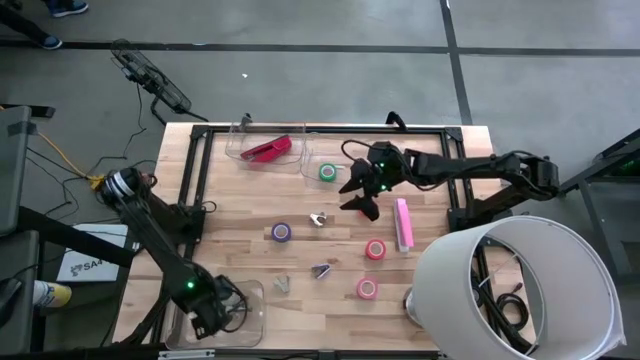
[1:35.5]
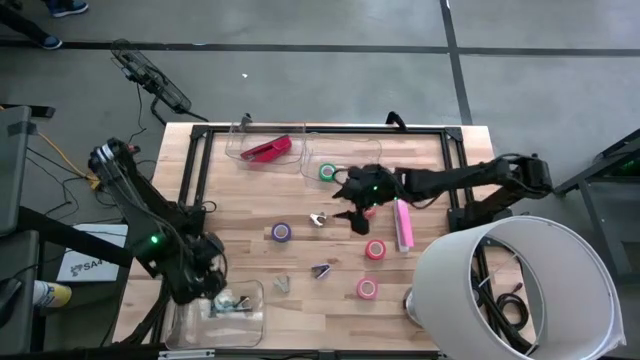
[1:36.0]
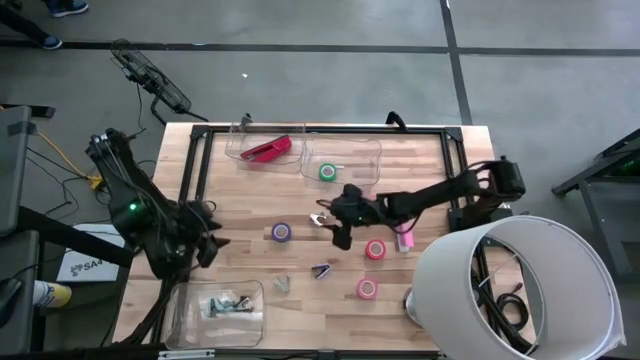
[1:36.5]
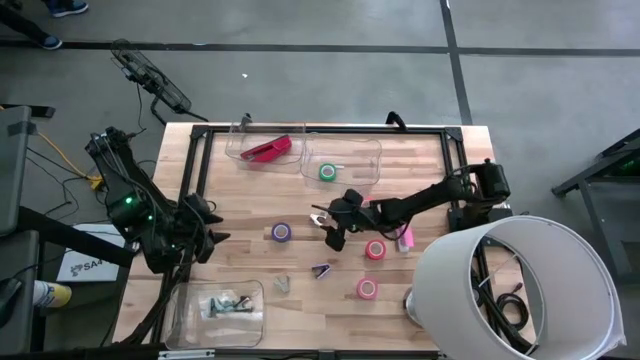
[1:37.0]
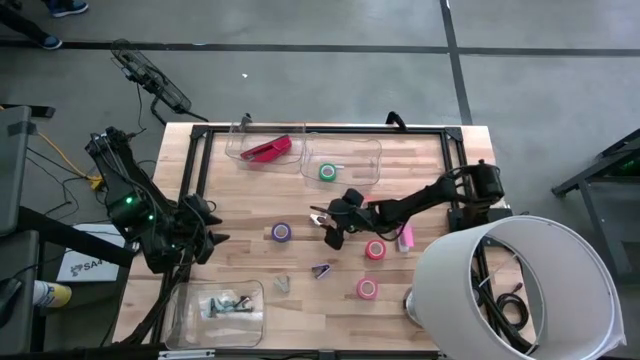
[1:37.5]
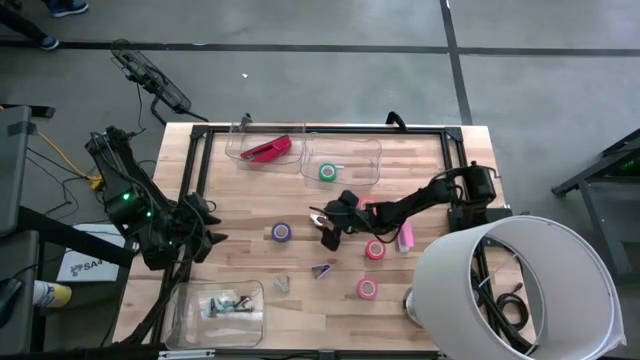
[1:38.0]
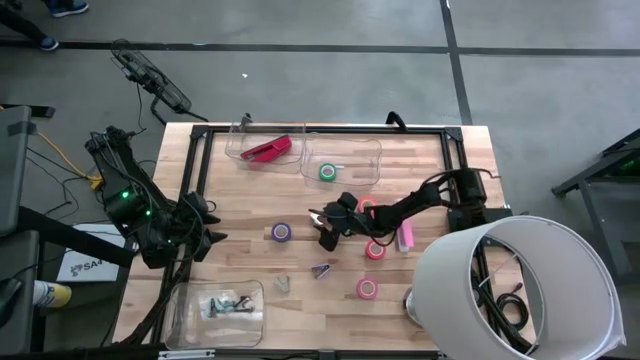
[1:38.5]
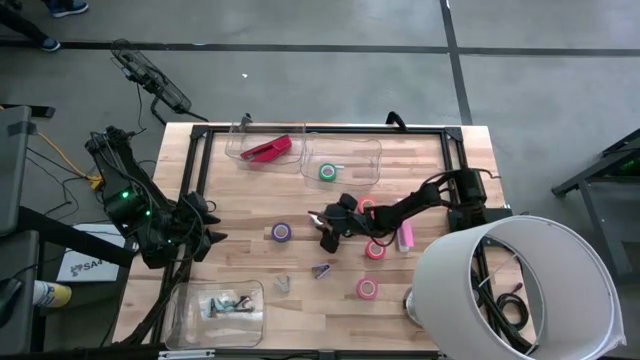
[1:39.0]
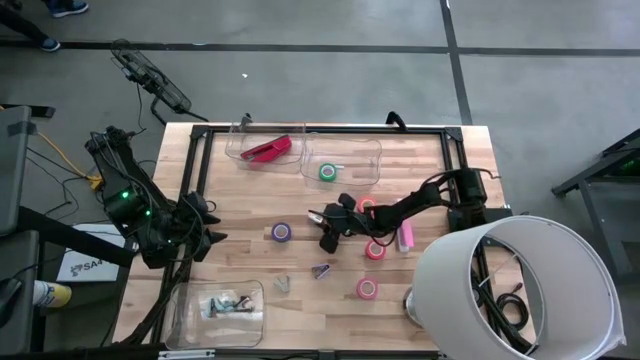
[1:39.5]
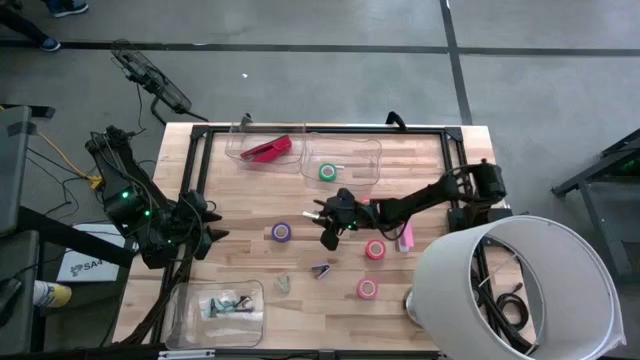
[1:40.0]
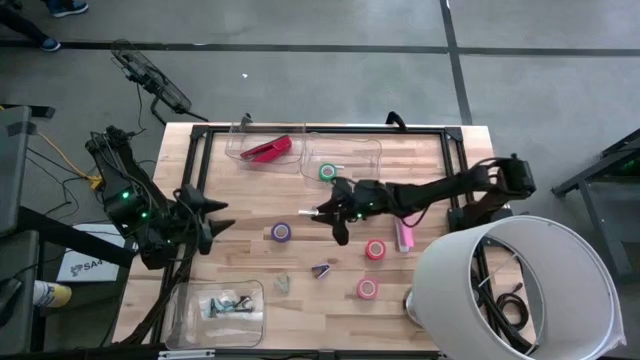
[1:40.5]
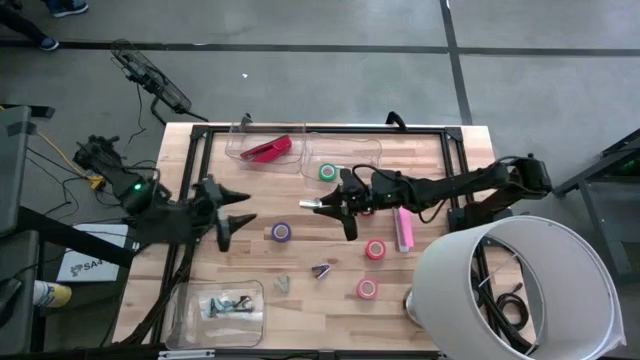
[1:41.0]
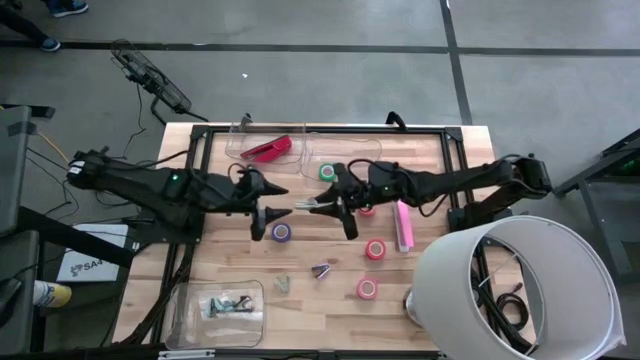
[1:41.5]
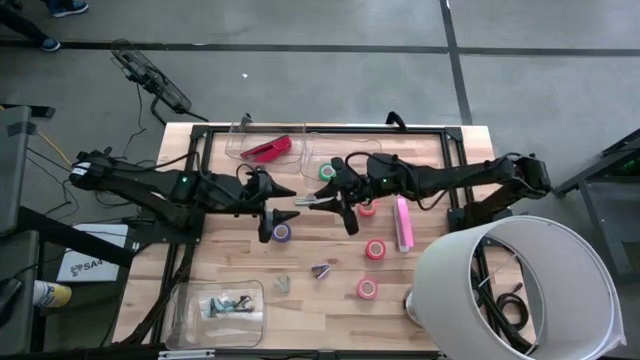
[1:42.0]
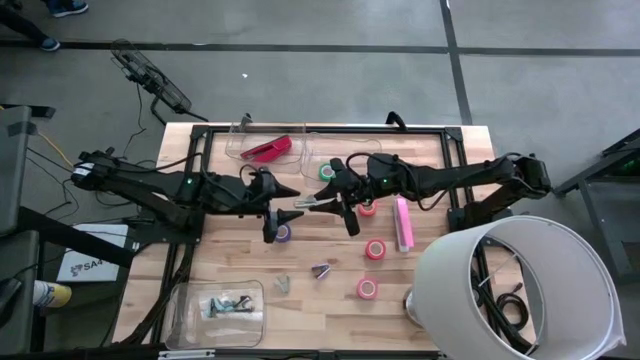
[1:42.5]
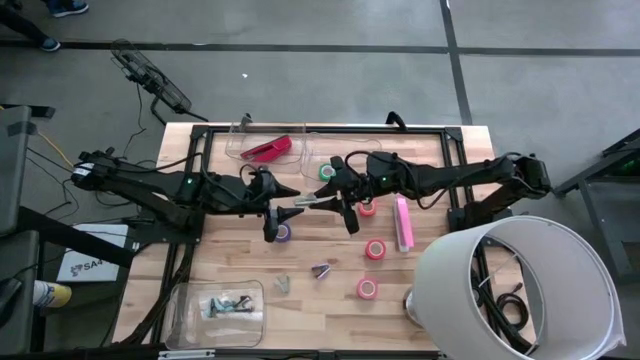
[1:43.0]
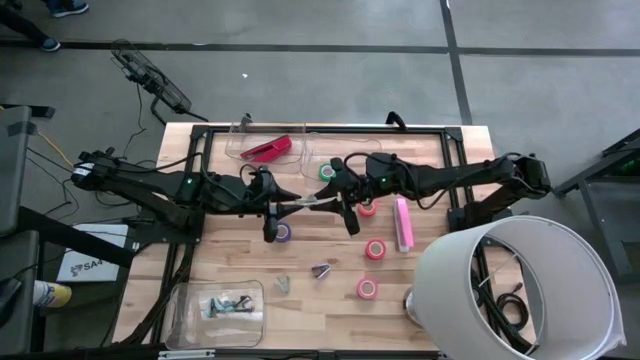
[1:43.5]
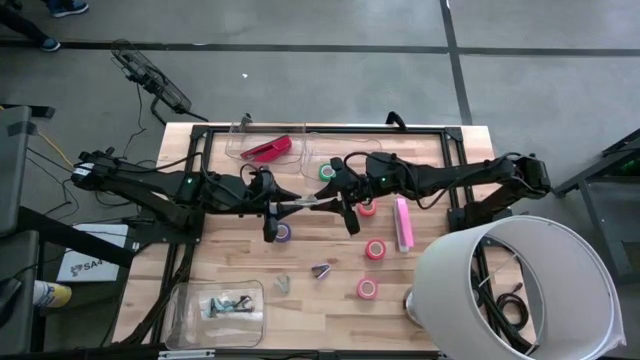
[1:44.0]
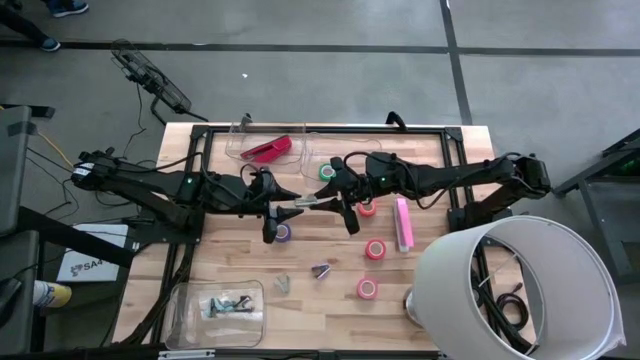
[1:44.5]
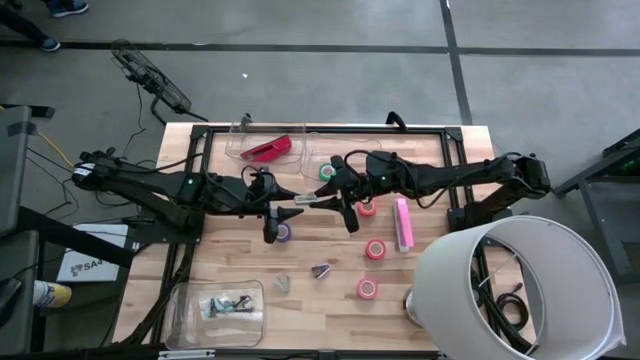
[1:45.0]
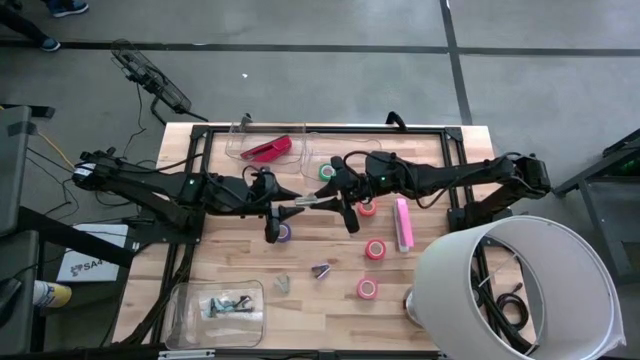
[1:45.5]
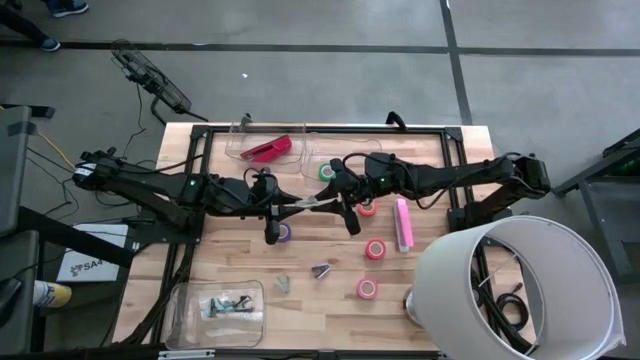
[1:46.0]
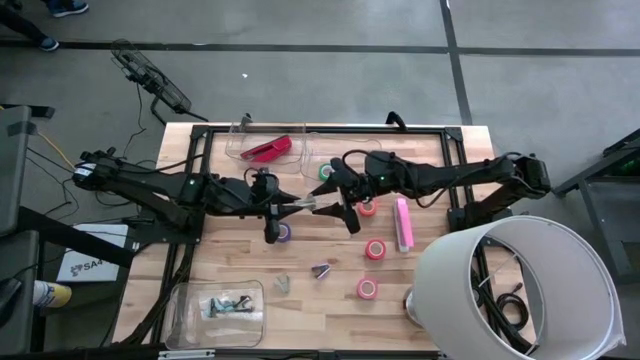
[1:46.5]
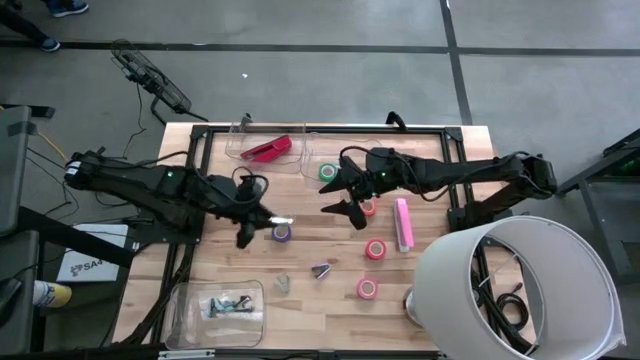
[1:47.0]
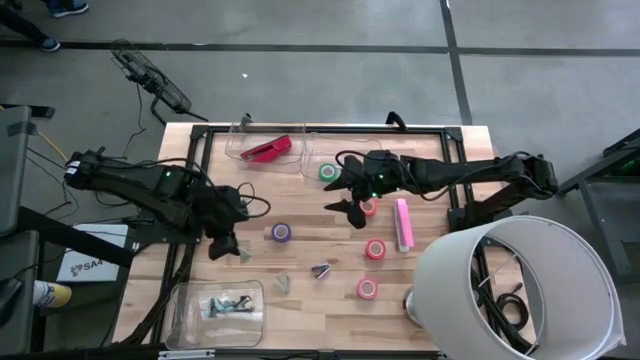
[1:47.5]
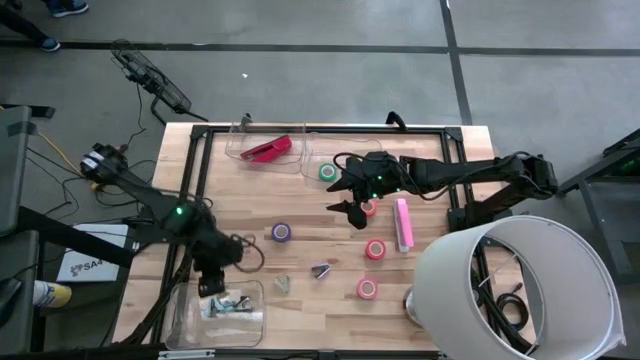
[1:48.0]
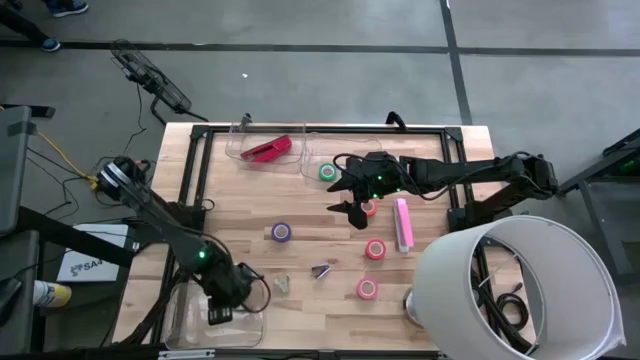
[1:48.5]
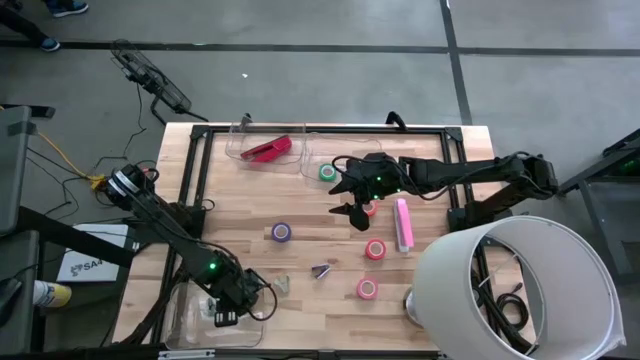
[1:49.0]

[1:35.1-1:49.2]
Task: Pick and place Stapler, Stapler remover, tape
Put the top gray stapler remover into the bottom transparent bin

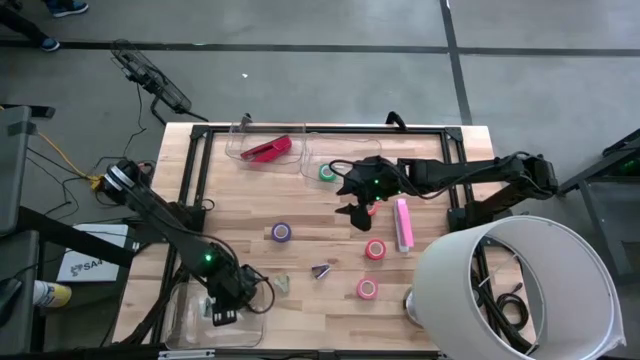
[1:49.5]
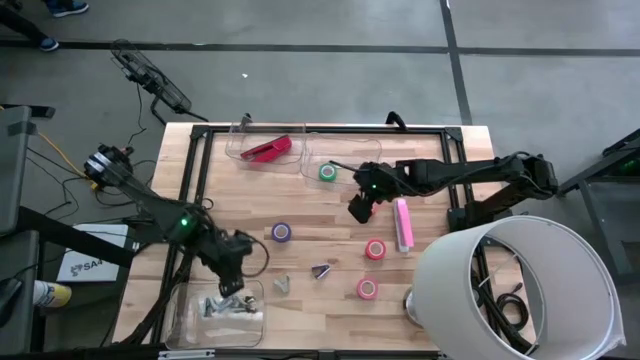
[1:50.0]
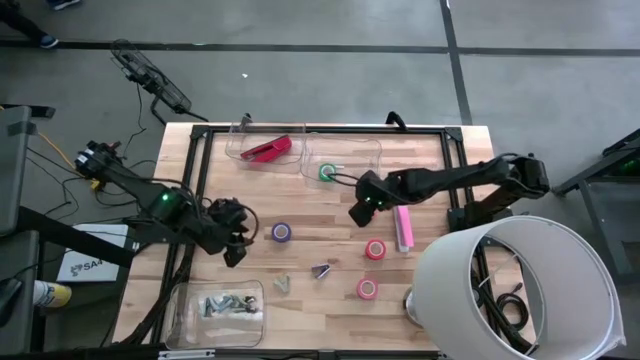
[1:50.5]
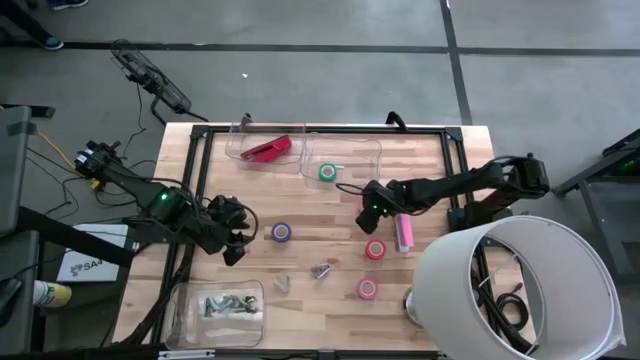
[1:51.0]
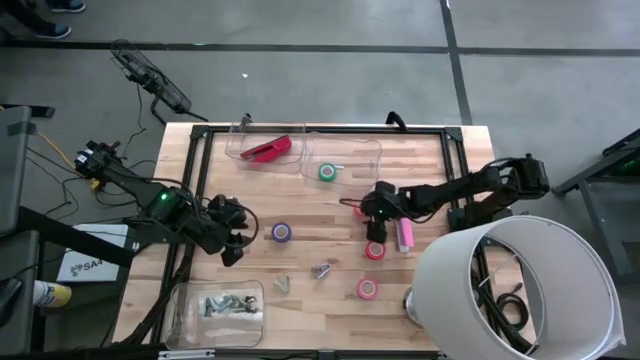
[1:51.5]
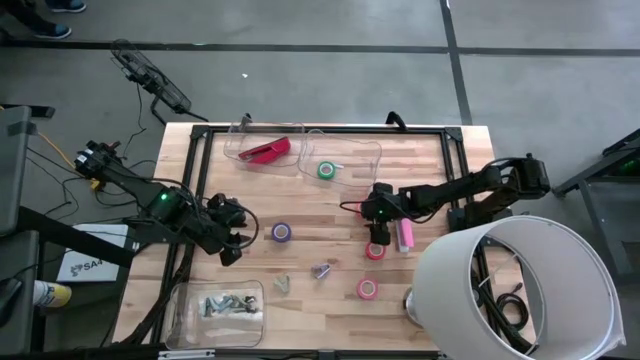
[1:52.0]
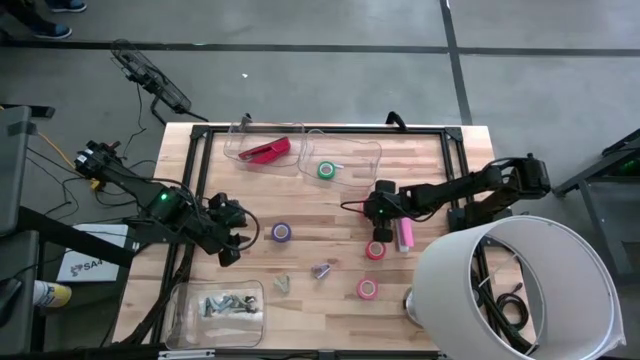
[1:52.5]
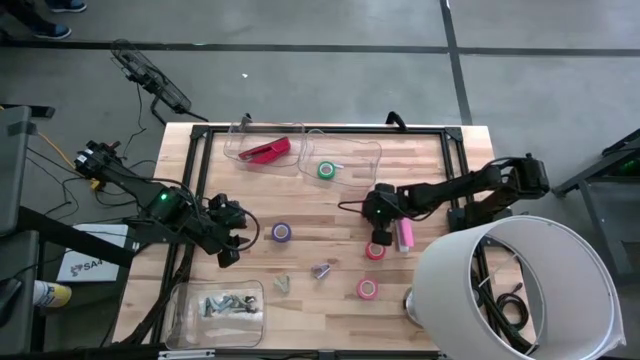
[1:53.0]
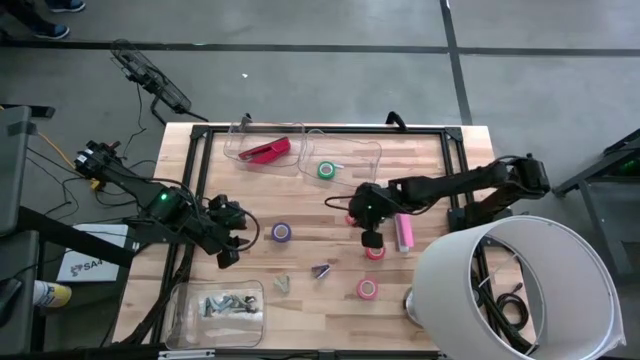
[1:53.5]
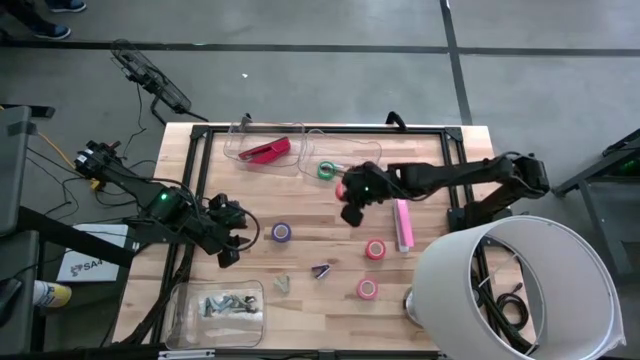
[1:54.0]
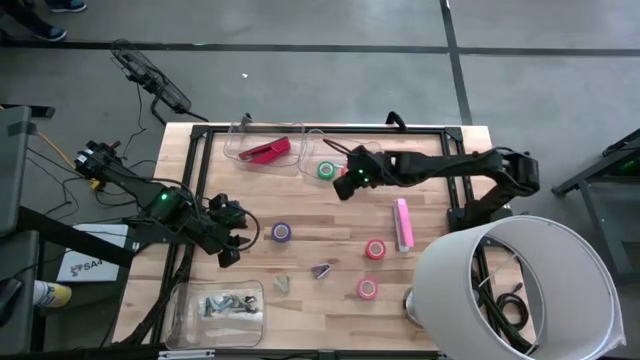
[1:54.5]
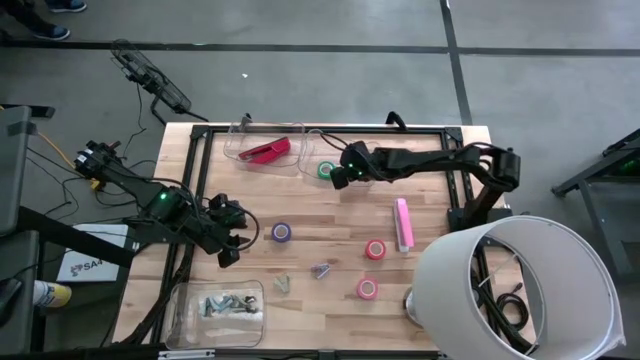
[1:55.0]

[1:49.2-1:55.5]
Put the orange tape into the top right transparent bin

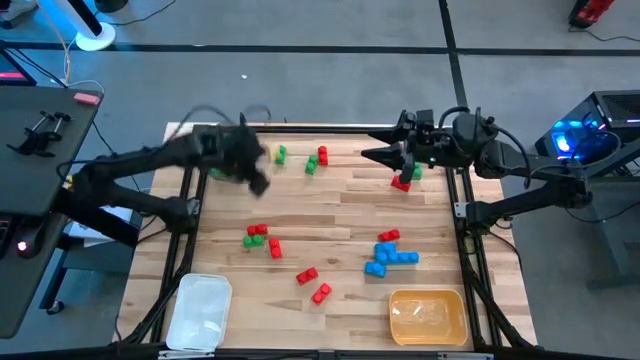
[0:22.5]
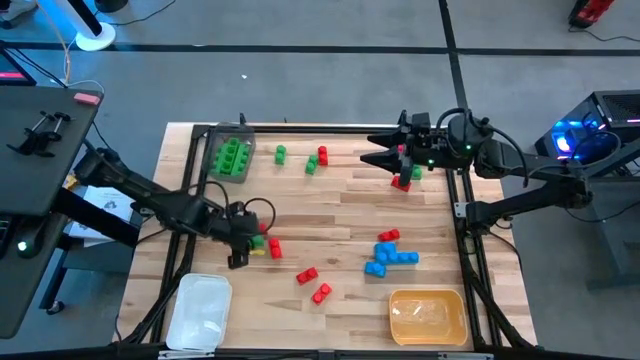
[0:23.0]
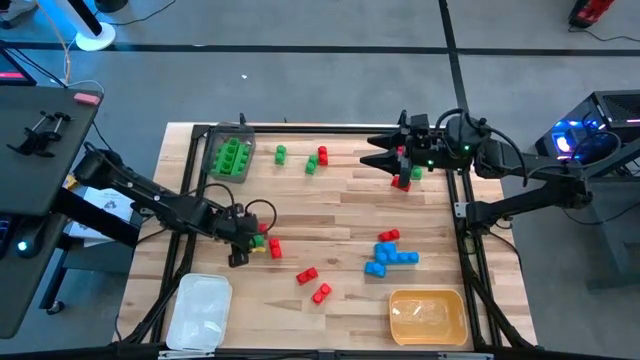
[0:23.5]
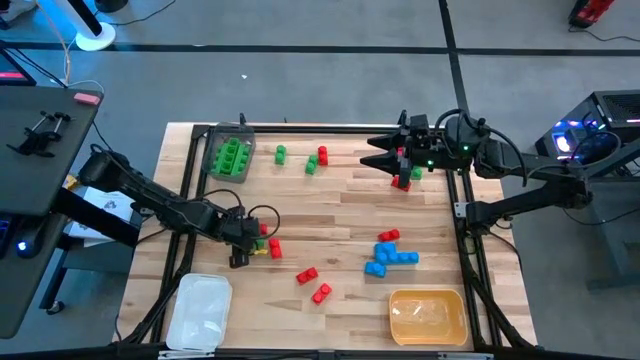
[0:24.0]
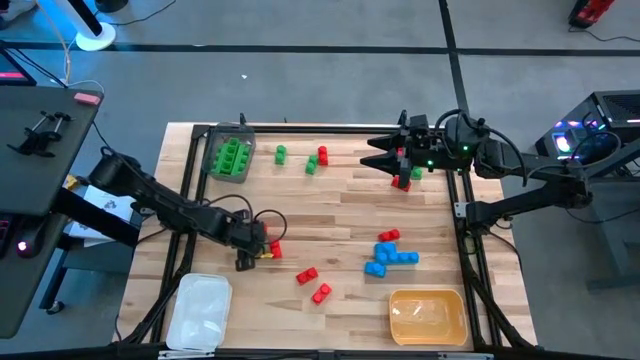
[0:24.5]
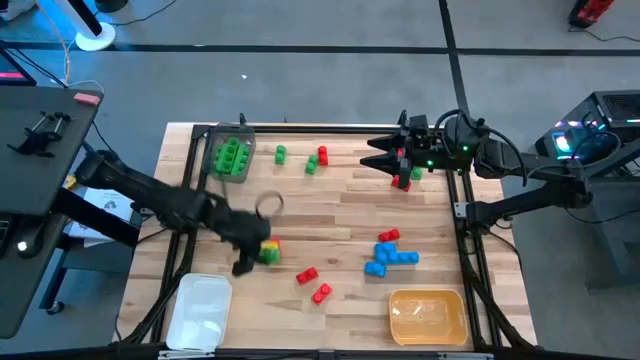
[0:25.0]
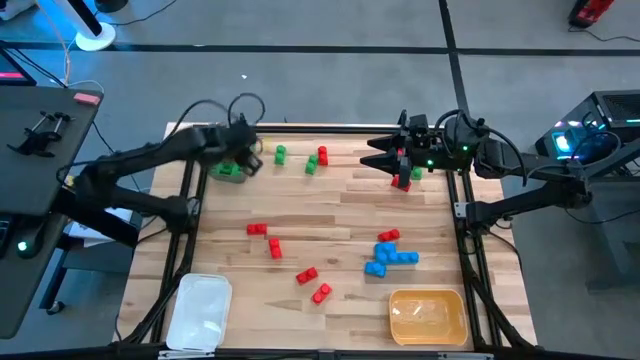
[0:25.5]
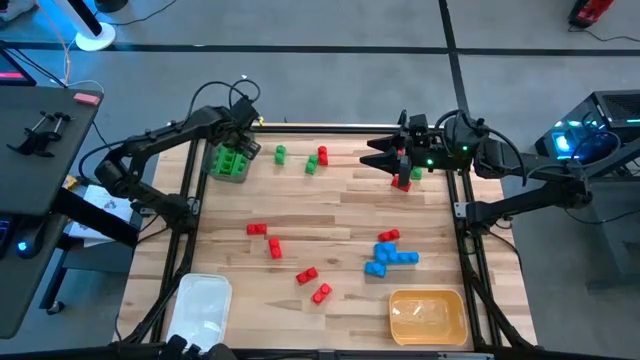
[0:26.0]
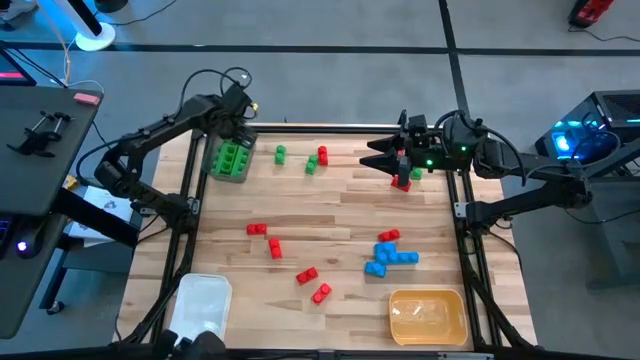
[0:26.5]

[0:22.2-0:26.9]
Task: Sort blocks
Put the green game piece into the black bin
